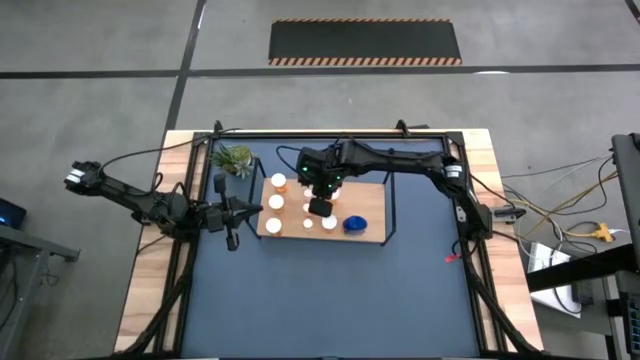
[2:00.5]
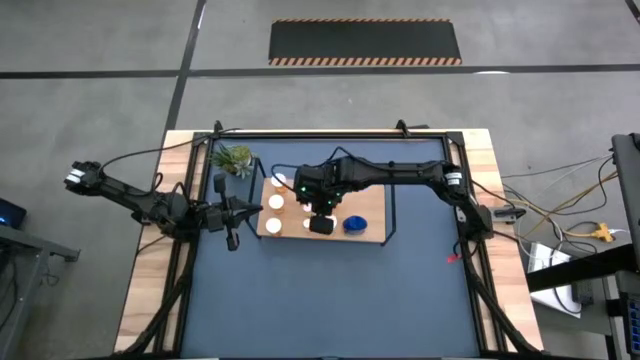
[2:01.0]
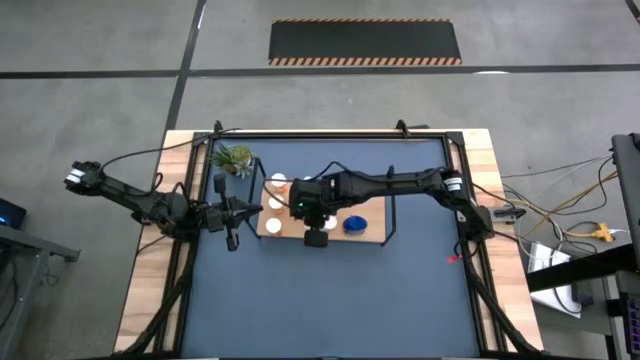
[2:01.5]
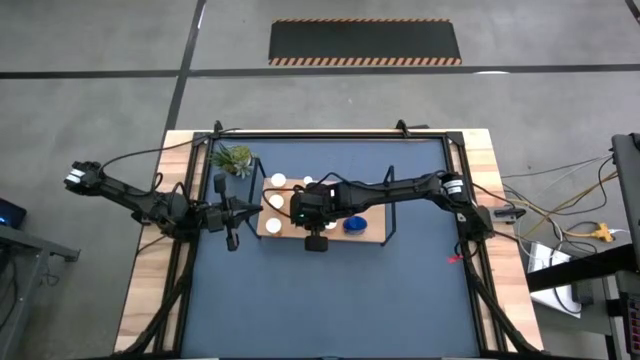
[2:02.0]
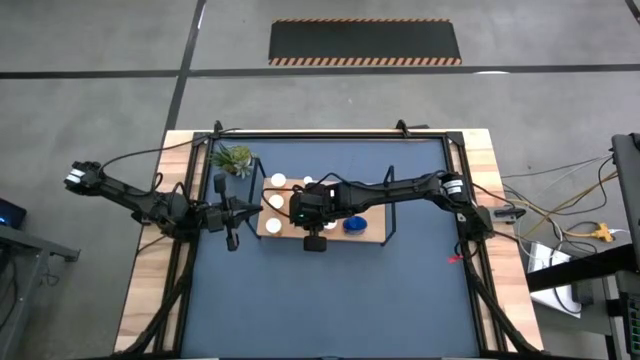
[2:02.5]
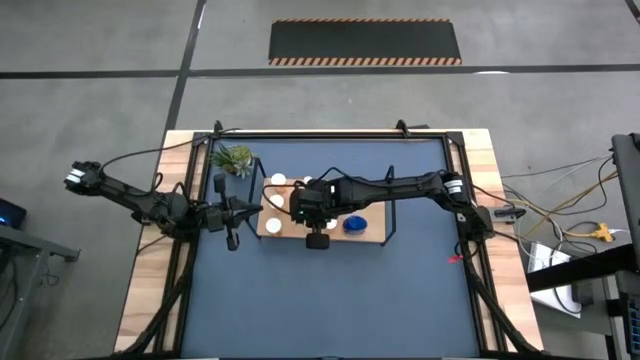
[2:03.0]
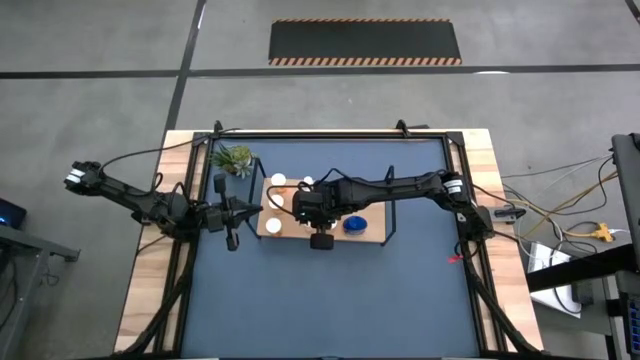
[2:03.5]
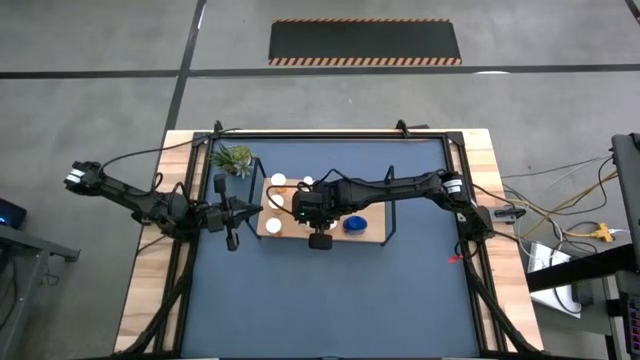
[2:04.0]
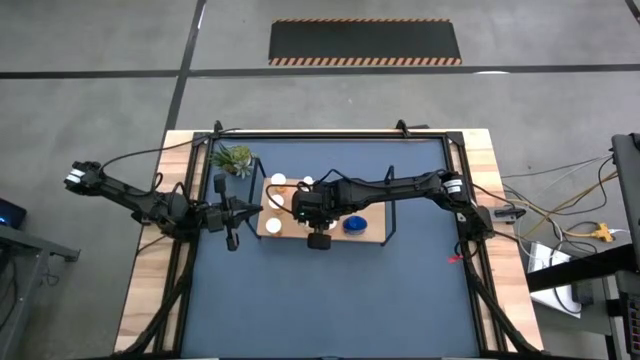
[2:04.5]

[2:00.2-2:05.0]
Task: Pick and place medicine bottles onto shelf by color
Adjust the bottom yellow pill bottle on the shelf

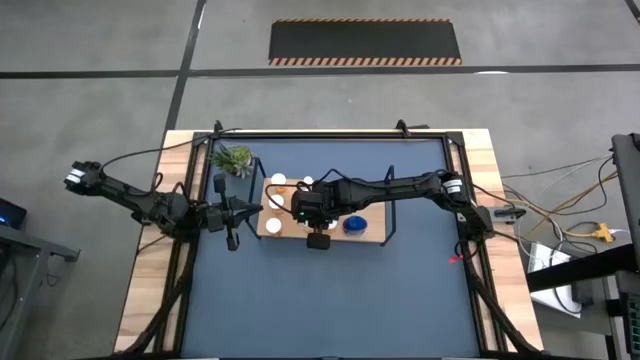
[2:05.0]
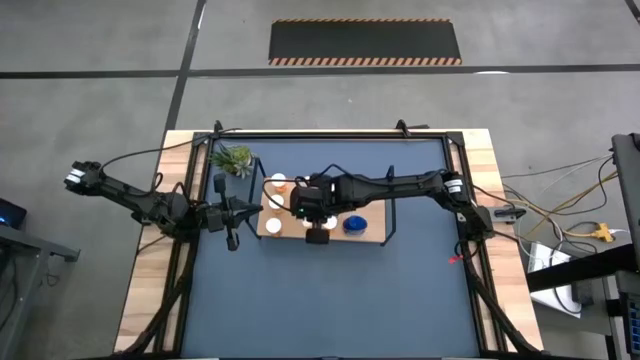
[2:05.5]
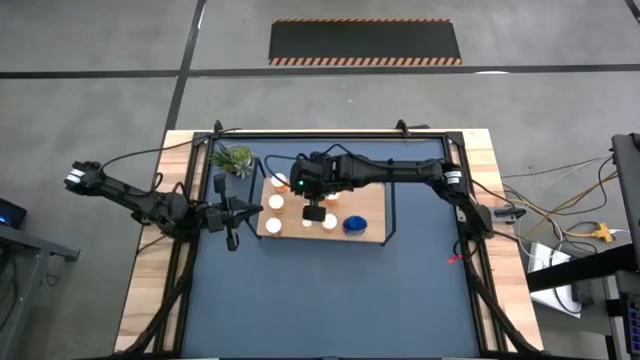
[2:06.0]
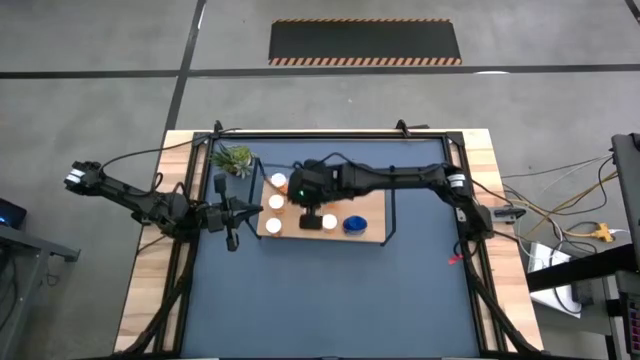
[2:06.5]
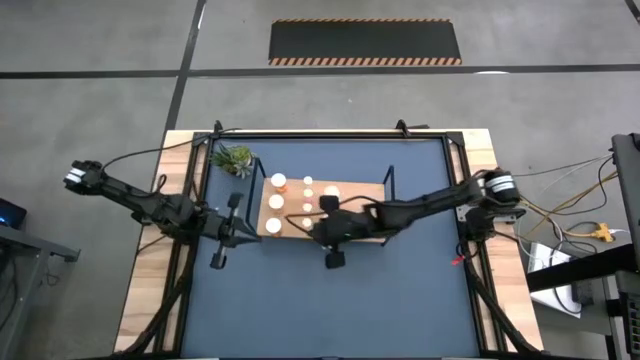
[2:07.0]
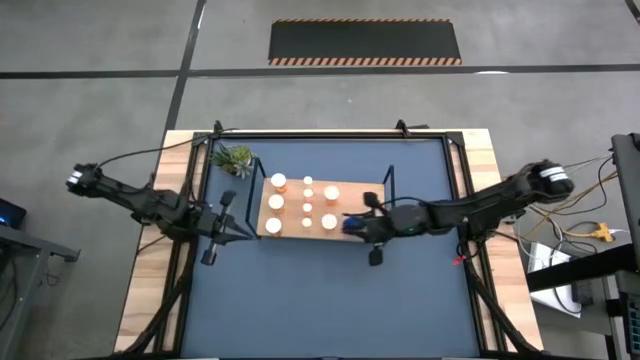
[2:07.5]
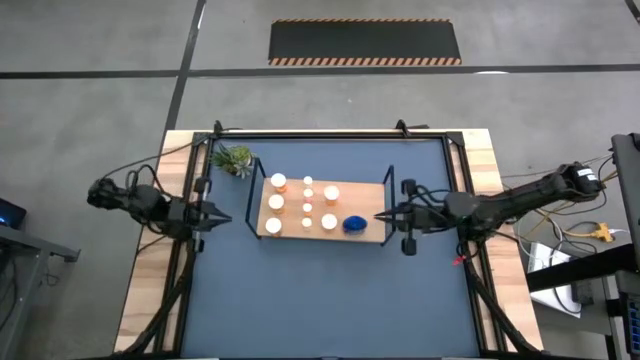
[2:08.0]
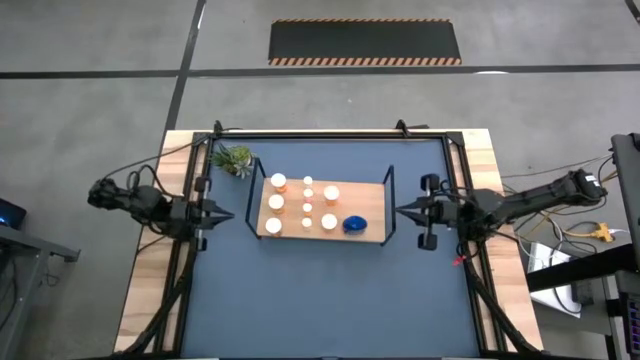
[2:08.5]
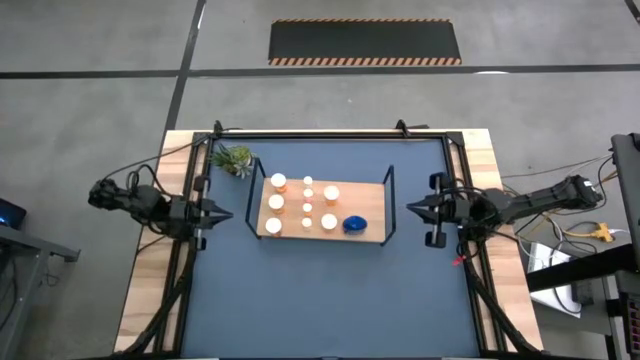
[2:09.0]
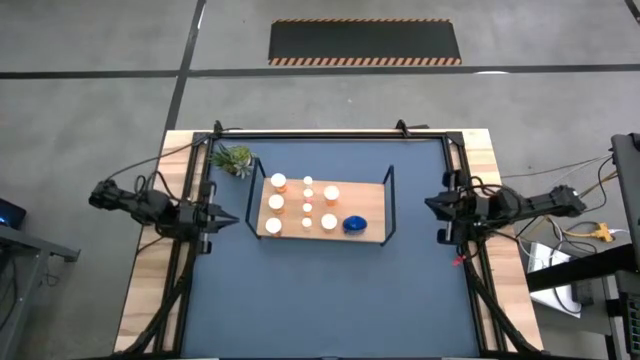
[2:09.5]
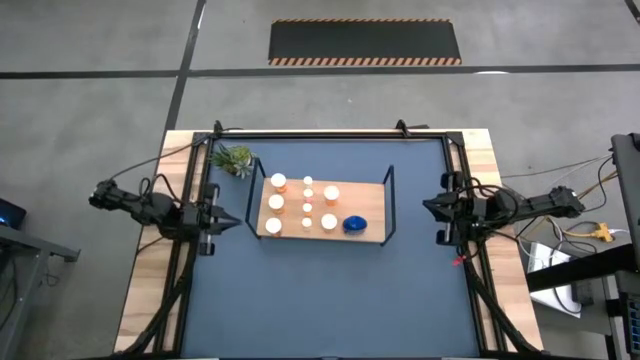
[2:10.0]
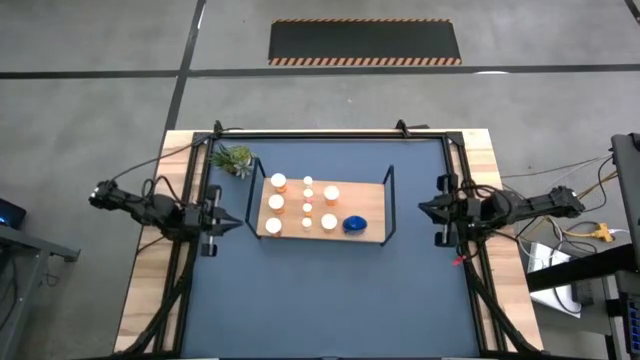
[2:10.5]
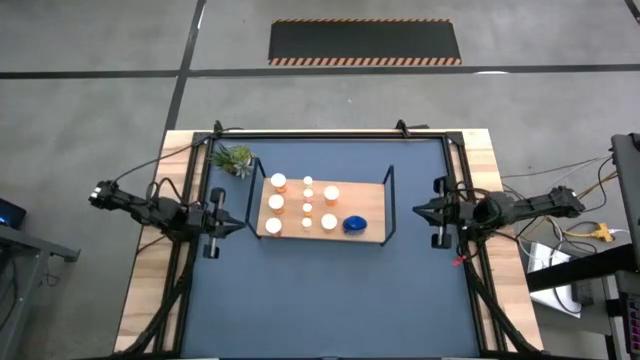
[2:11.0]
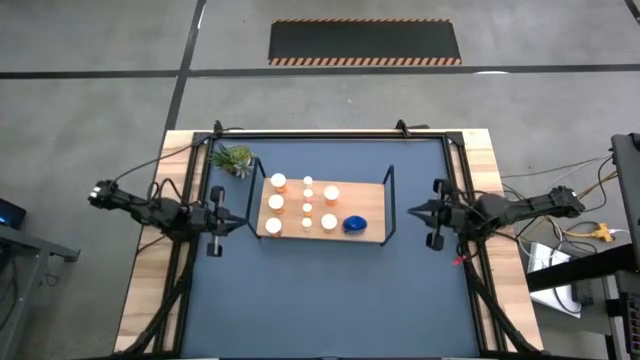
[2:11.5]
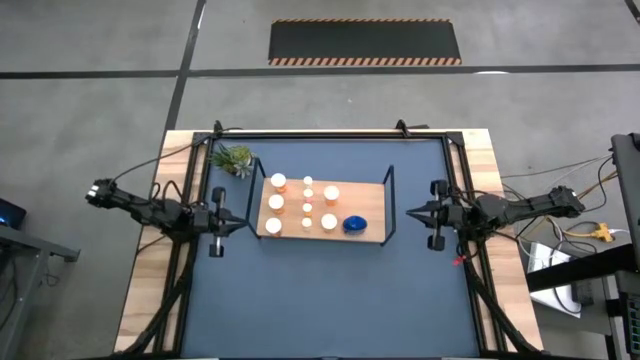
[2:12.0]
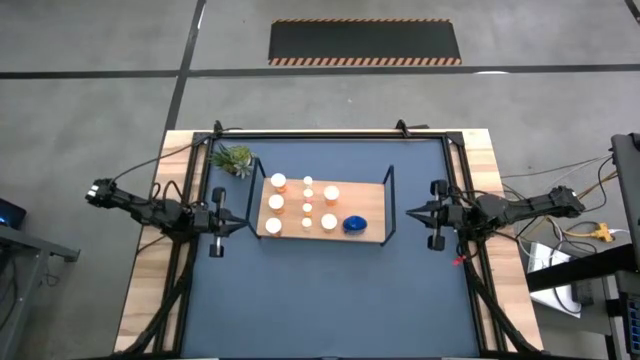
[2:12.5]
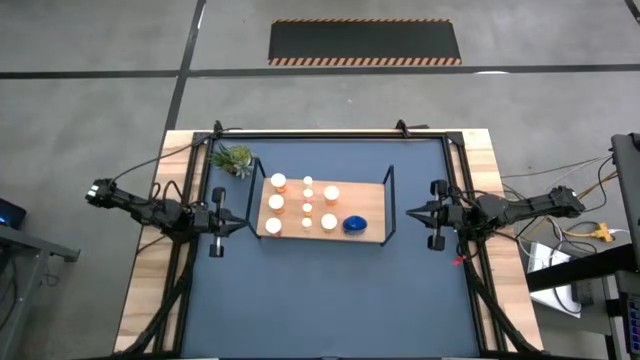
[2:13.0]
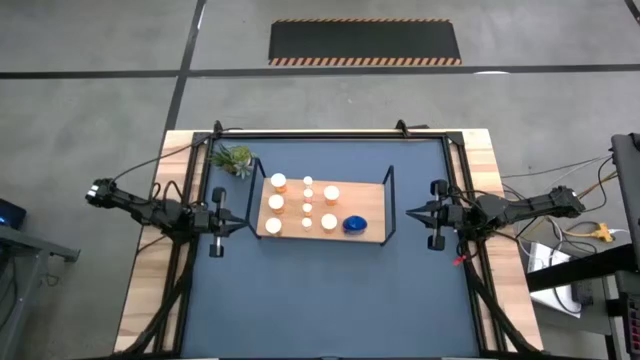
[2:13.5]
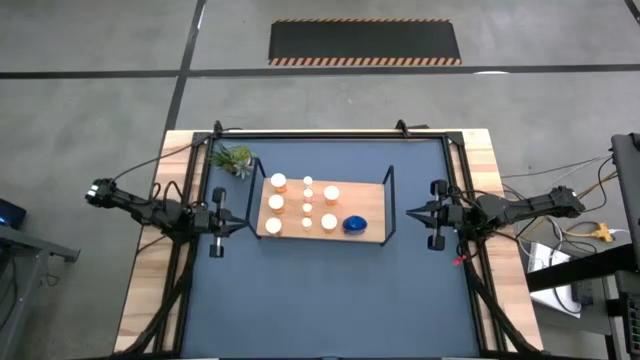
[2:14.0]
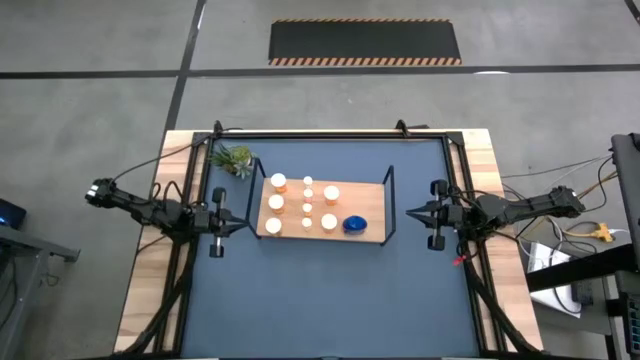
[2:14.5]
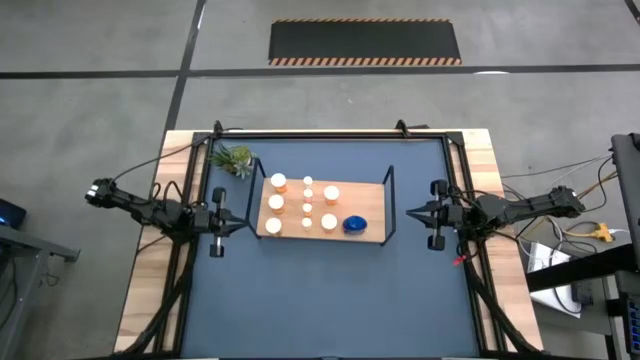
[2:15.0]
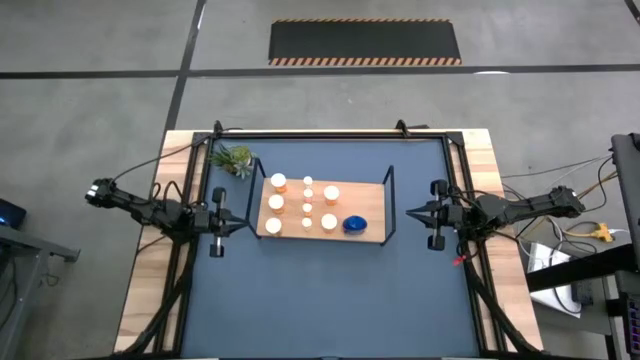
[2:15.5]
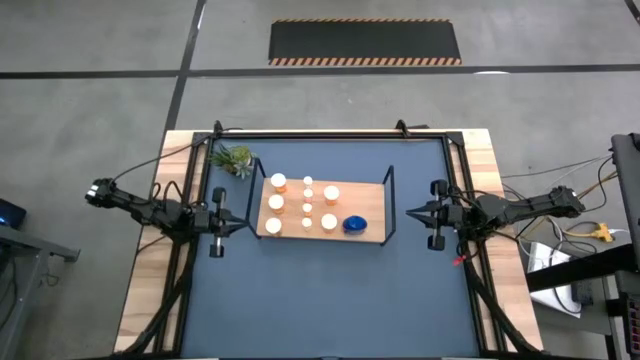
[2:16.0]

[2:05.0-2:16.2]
Return to Home Position

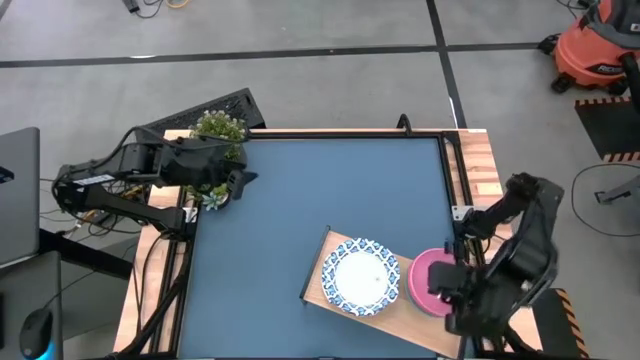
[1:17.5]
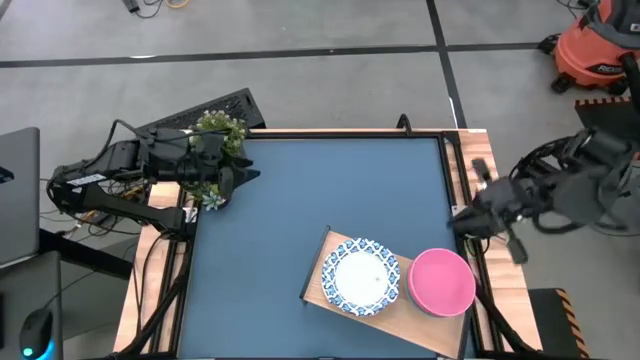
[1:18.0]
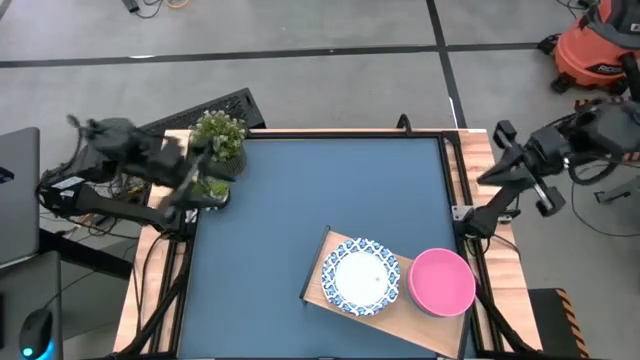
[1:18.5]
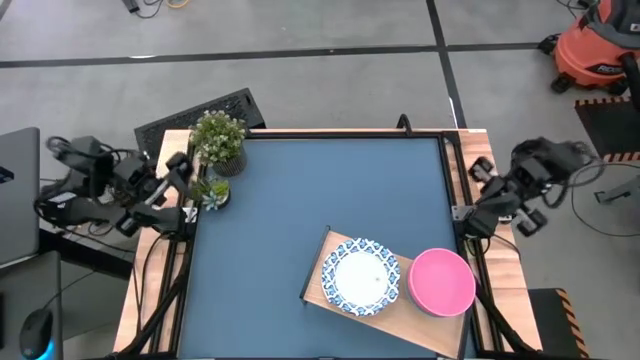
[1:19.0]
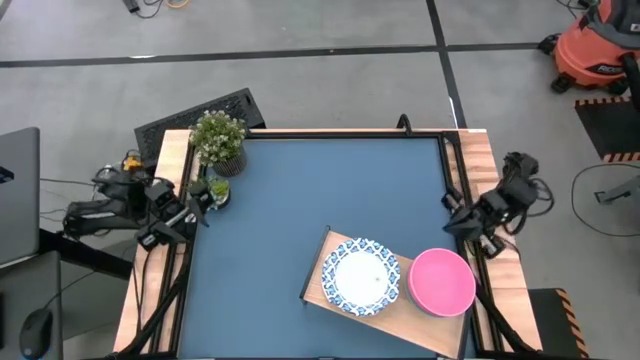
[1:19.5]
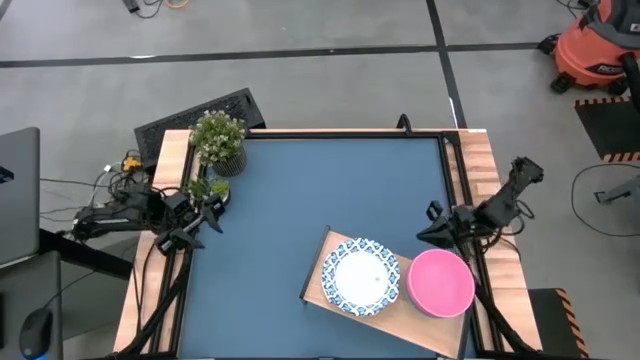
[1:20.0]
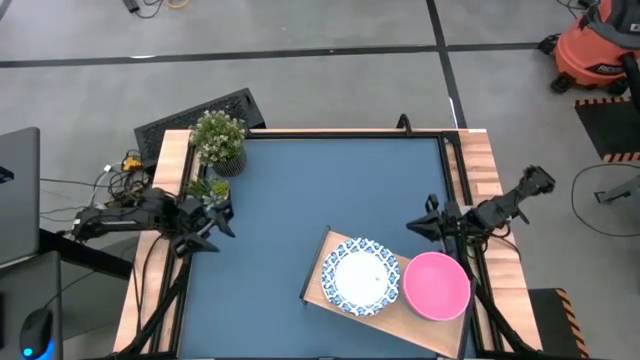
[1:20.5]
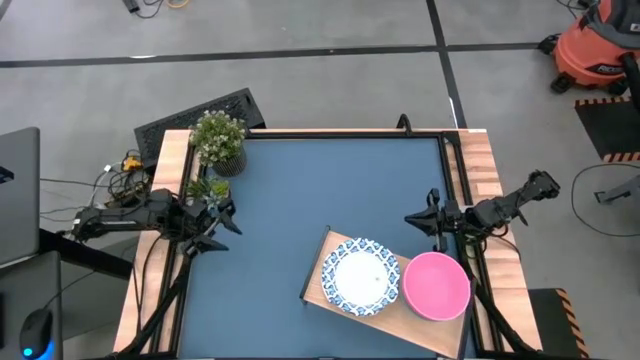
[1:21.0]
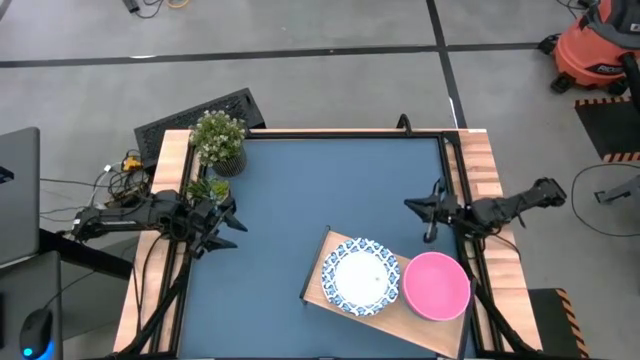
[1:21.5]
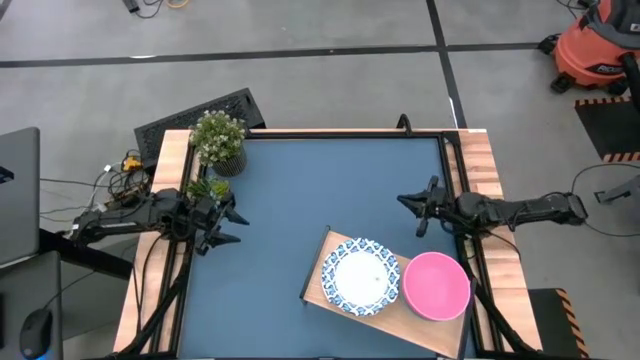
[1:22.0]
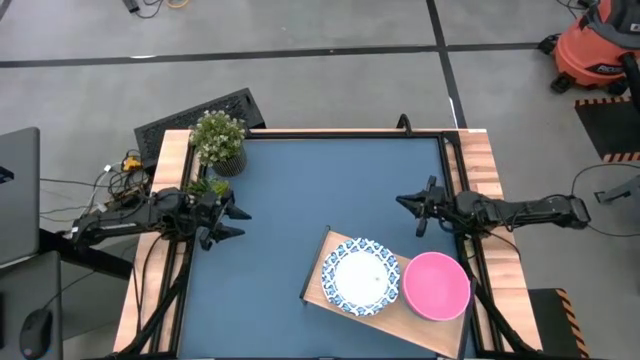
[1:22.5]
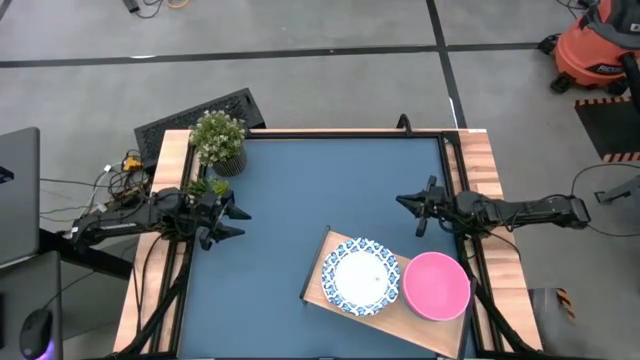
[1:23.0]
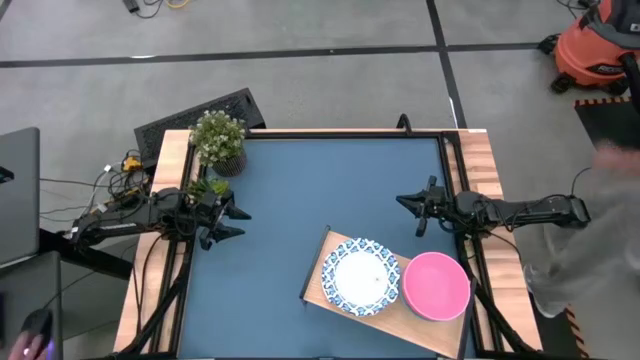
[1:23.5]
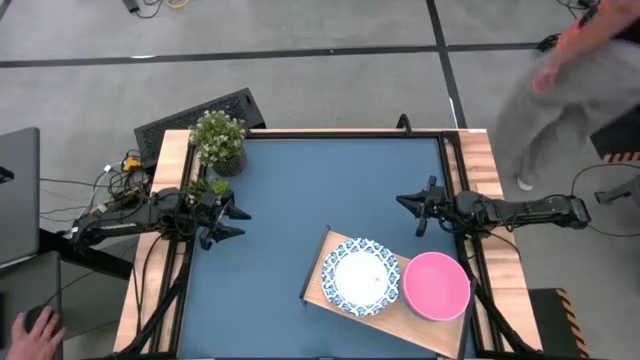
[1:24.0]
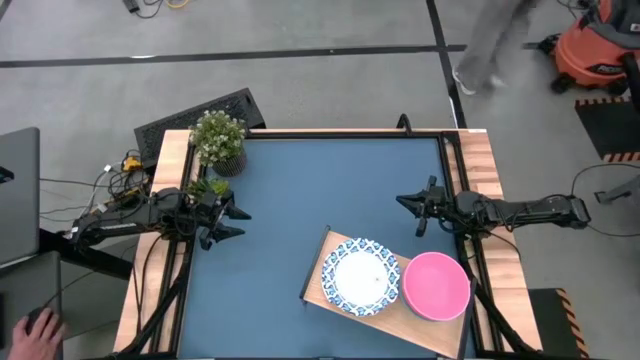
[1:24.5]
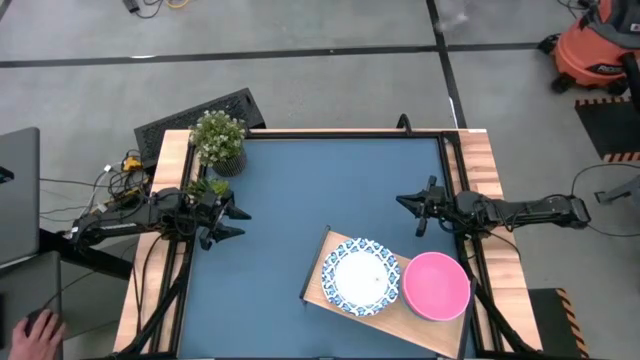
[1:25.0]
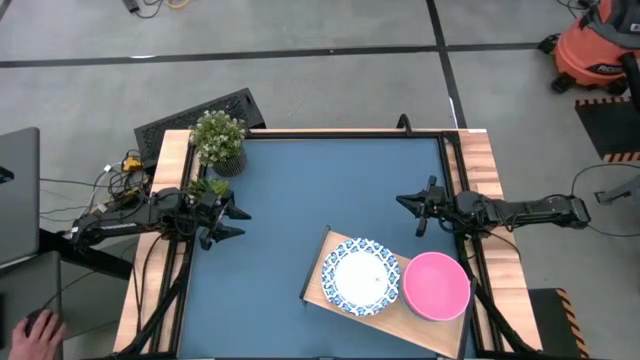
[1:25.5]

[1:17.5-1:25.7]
Task: Place and stack bowls onto a shelf
Return to Home Position
